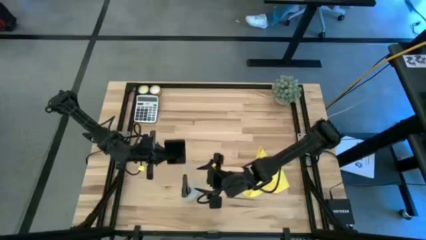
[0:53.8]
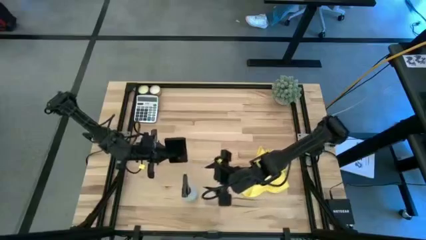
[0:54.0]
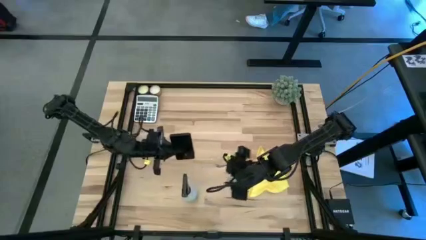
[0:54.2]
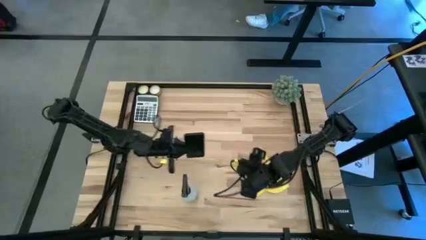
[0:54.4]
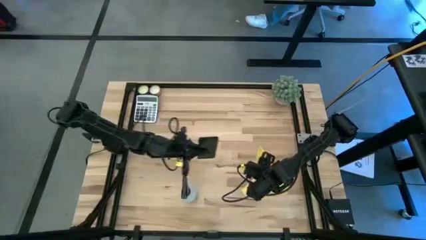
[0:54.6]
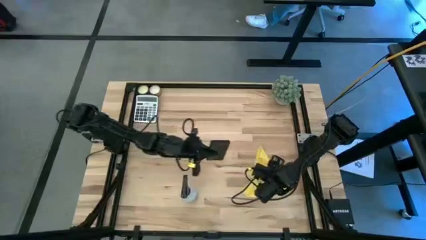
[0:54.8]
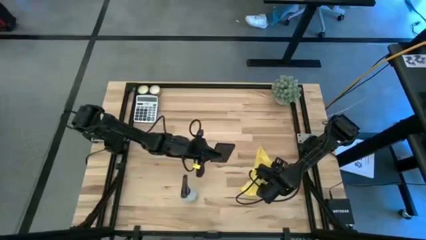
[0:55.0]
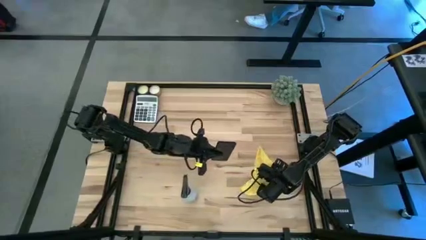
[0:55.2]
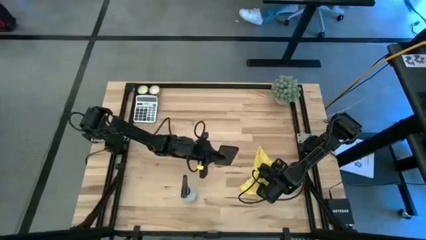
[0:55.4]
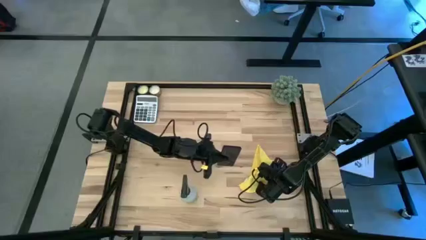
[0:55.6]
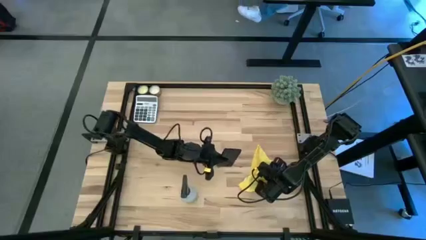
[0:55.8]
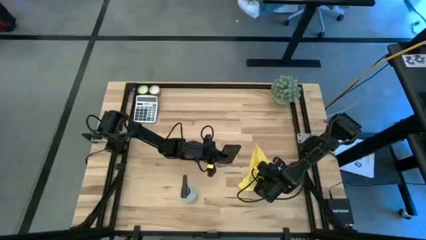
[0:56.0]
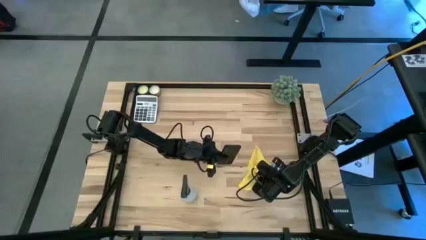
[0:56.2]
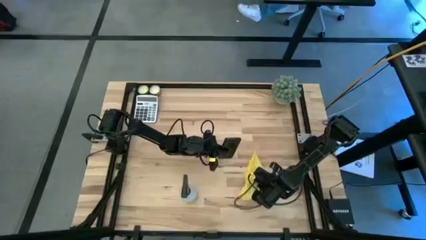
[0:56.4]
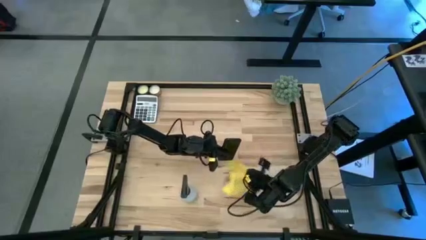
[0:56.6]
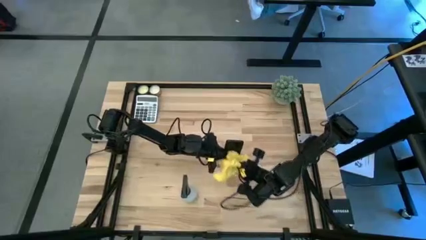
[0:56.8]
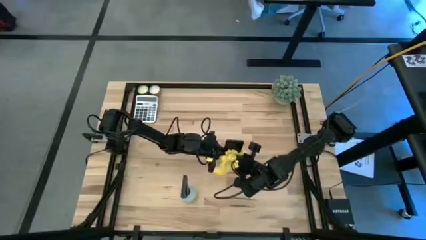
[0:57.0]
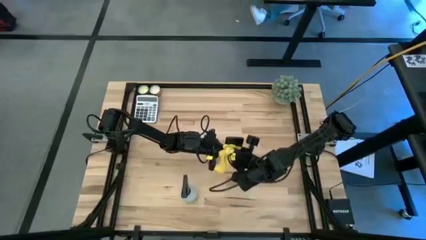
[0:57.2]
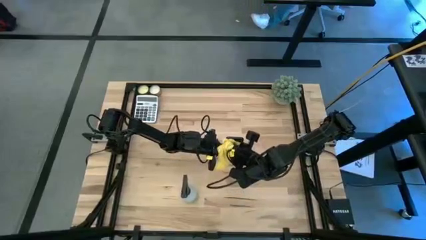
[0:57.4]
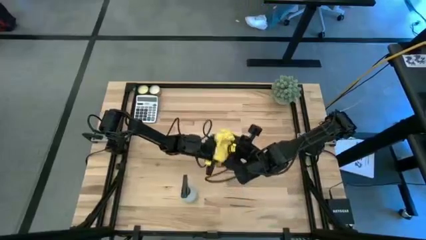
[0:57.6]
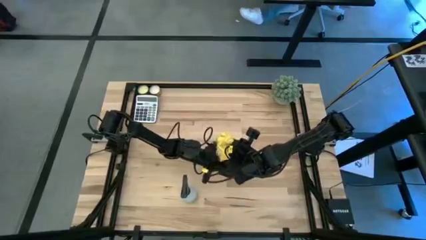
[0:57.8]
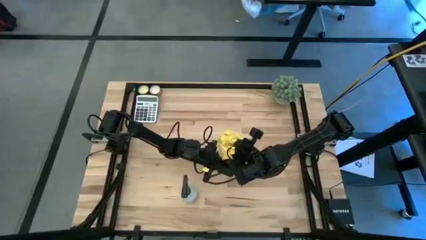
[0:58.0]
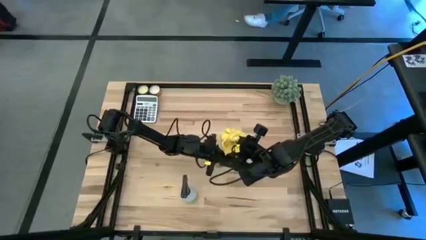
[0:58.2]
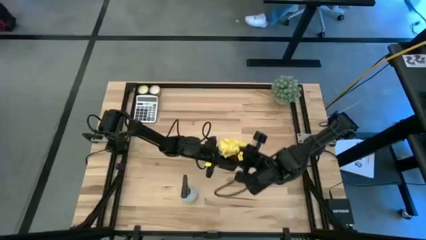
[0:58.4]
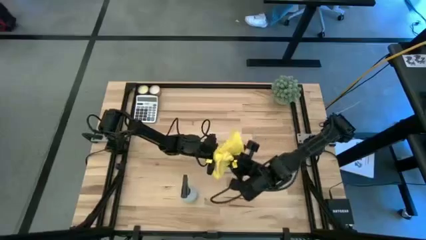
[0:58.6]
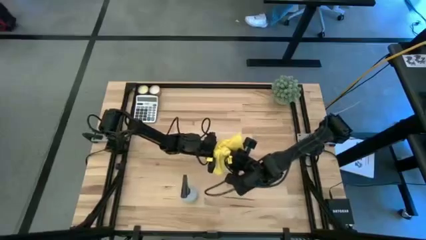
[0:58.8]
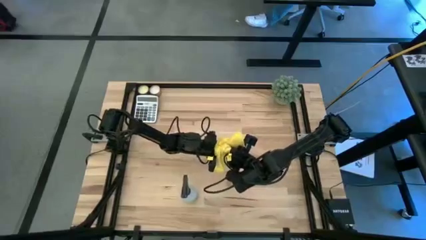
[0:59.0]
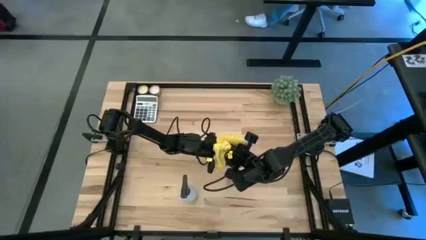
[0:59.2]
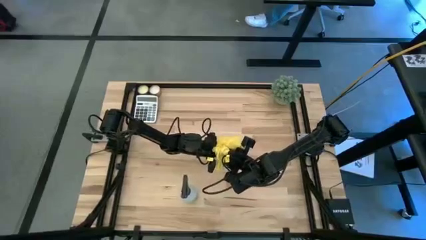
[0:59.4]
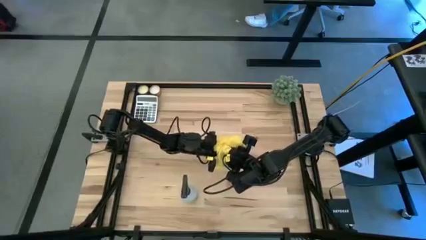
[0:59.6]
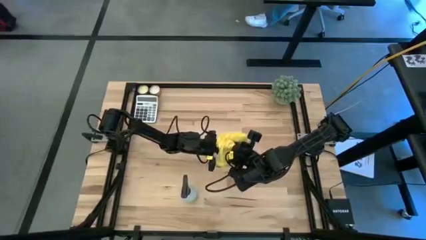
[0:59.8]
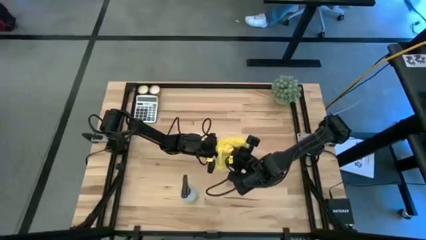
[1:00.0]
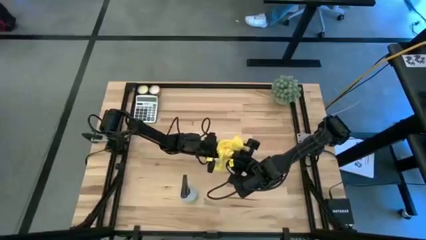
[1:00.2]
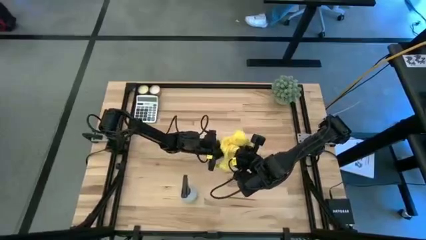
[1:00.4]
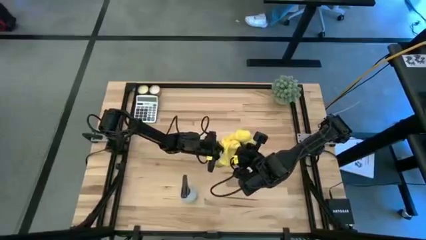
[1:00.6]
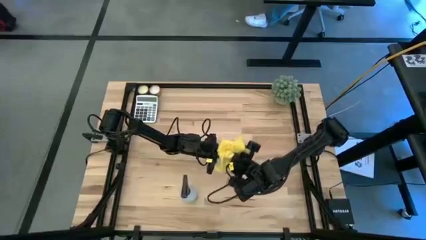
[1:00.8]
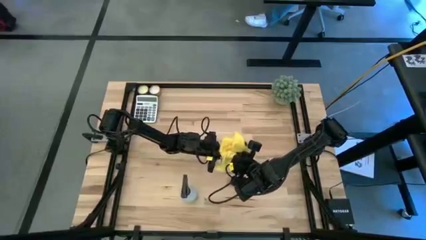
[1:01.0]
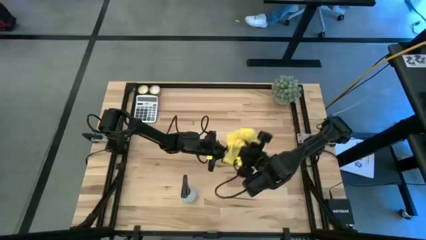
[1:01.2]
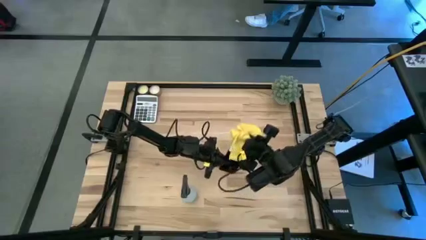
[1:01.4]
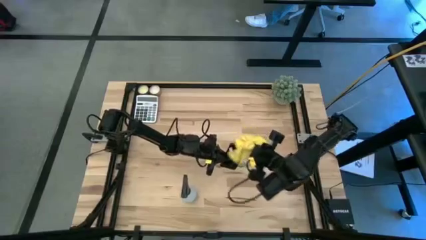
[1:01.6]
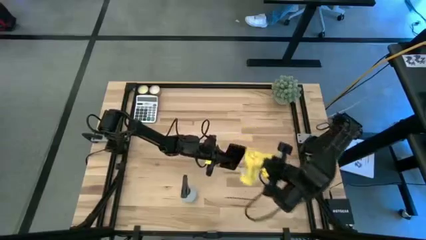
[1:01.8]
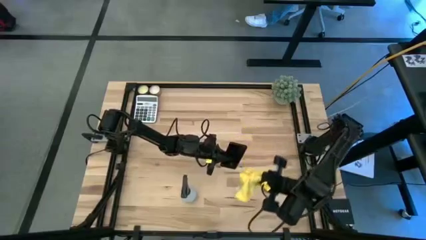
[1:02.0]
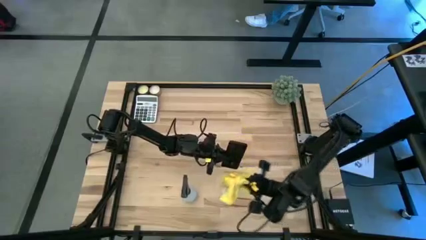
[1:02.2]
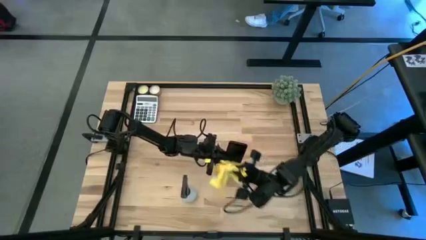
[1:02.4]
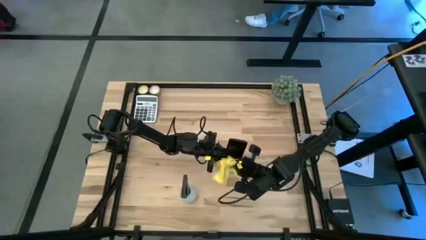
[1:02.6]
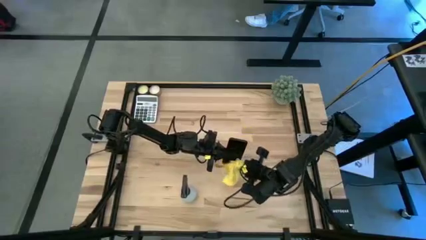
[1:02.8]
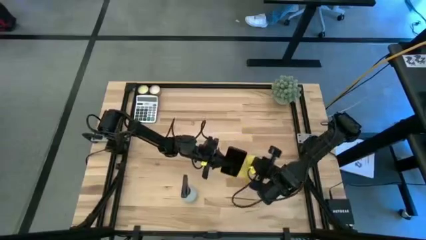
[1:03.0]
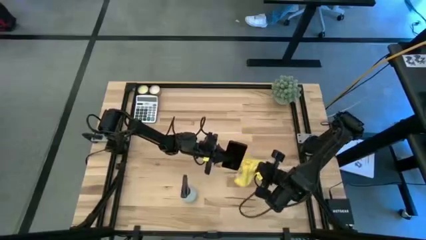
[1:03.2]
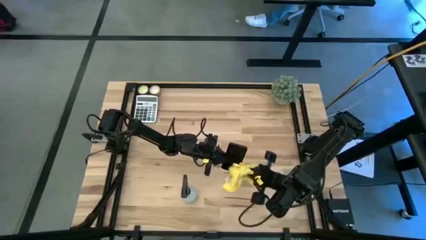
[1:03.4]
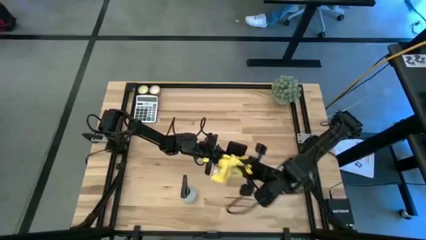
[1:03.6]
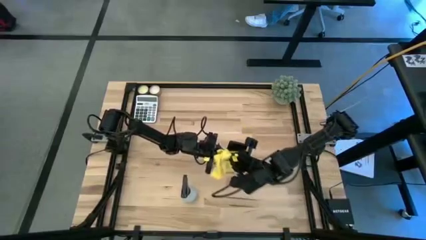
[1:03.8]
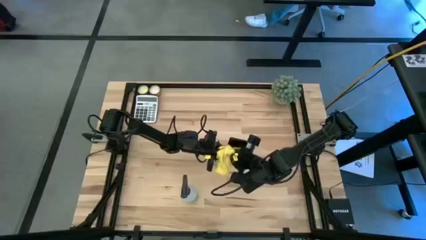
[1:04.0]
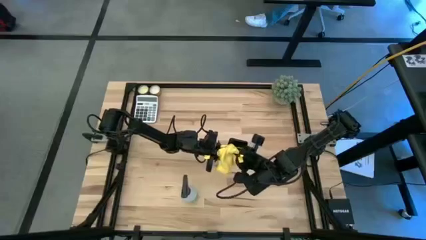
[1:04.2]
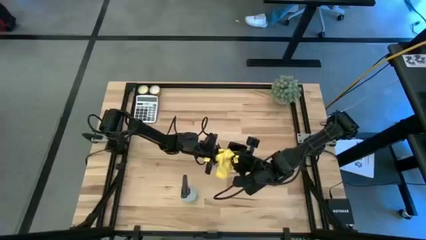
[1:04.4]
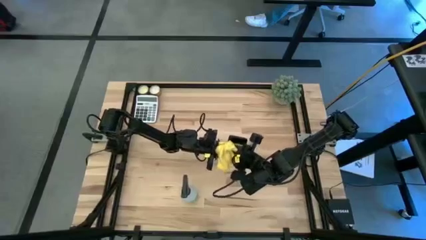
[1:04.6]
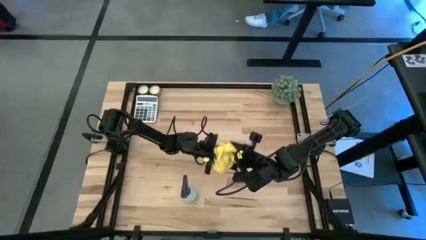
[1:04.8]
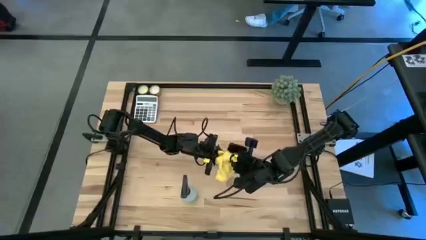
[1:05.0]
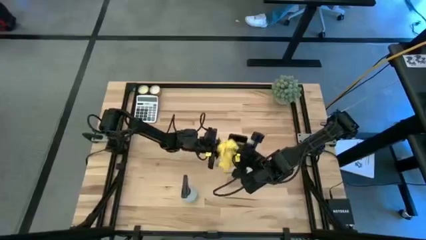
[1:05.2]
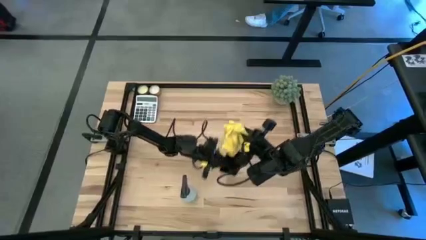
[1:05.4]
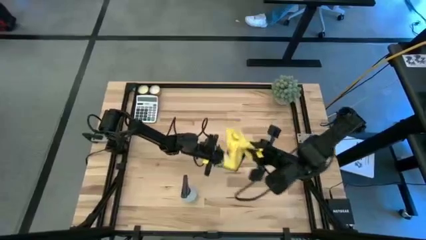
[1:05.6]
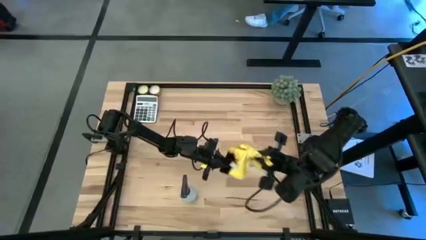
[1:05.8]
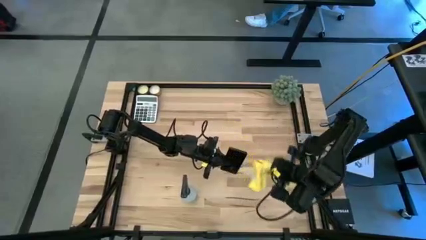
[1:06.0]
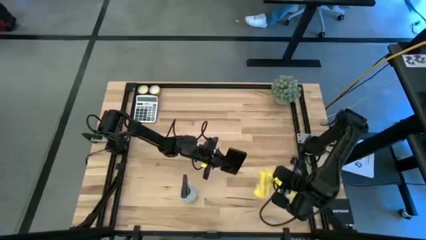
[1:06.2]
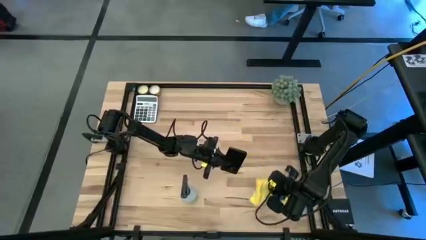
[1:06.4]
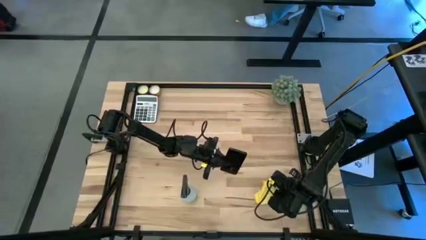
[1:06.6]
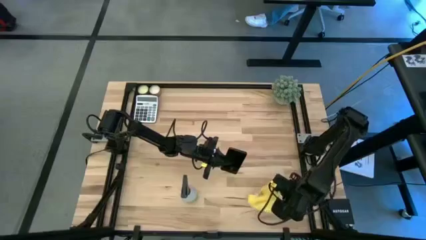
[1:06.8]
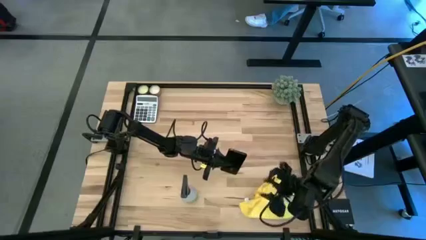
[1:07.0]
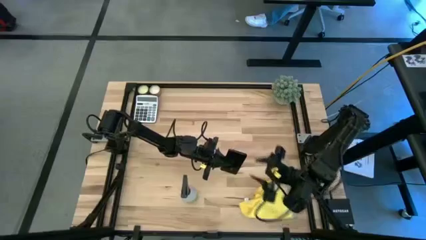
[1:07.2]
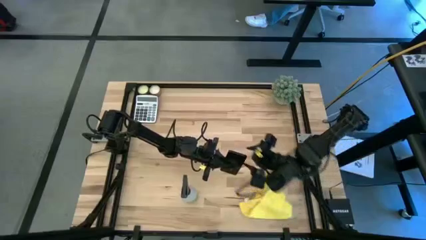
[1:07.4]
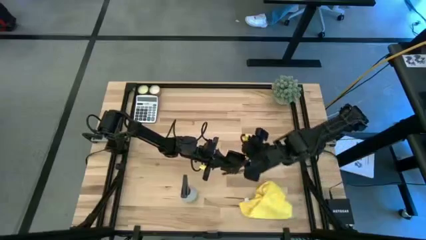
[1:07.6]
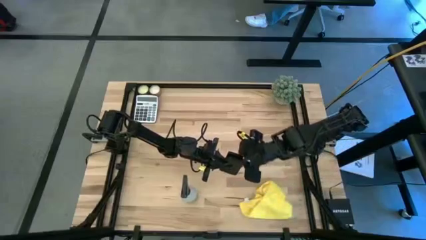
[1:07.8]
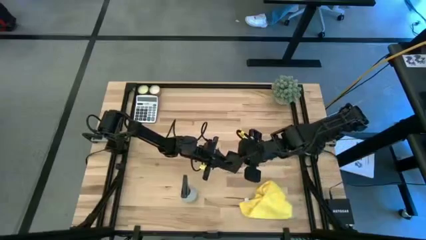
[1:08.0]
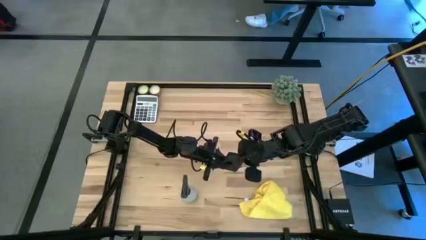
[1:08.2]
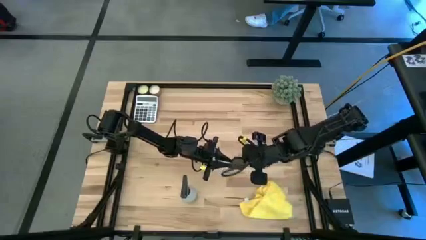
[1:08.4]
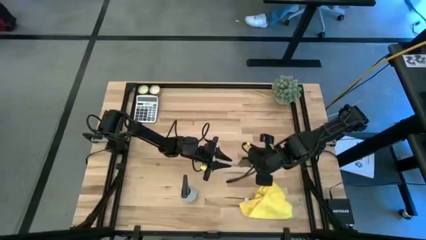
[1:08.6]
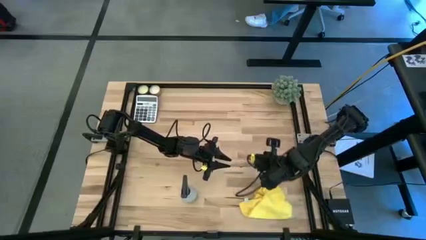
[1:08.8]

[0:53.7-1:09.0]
Task: Apply microfiber cloth
Wipe the black cellphone with the yellow microfiber cloth
